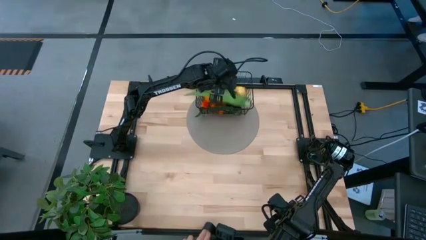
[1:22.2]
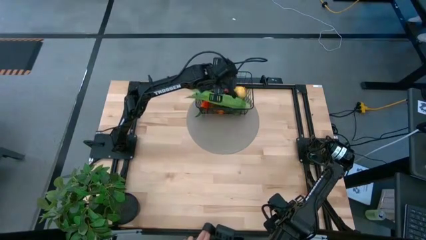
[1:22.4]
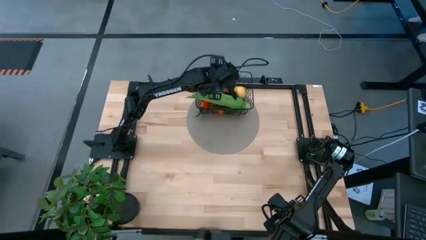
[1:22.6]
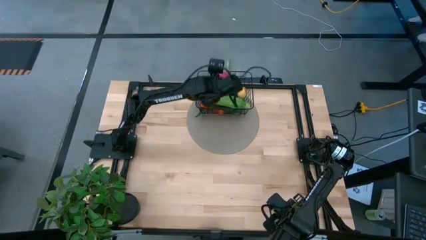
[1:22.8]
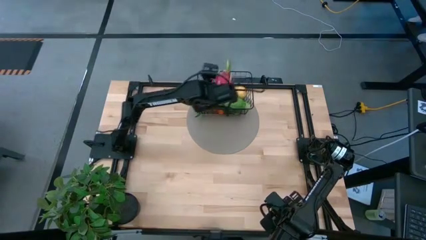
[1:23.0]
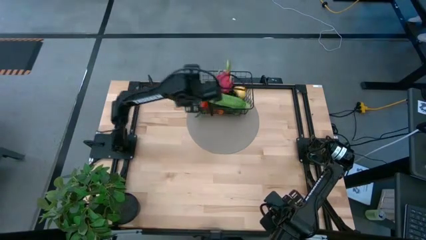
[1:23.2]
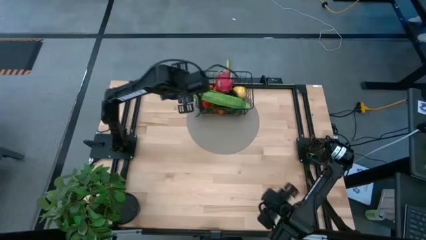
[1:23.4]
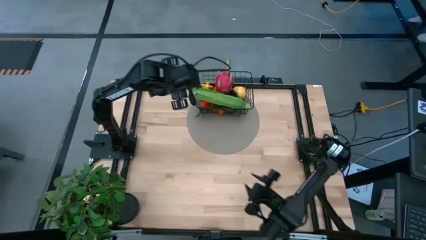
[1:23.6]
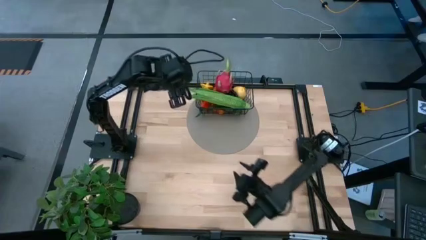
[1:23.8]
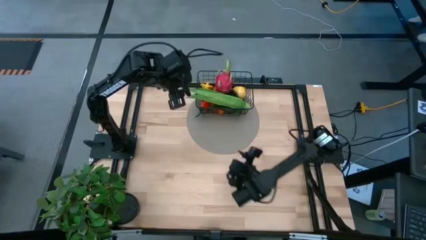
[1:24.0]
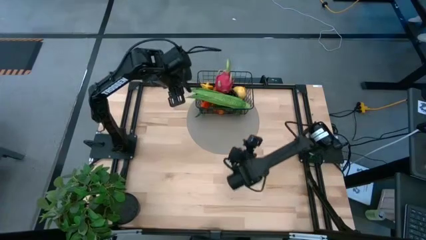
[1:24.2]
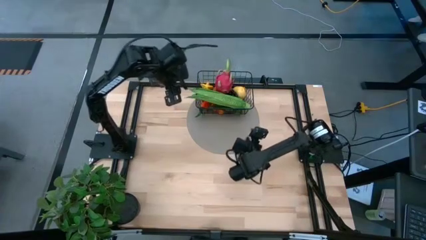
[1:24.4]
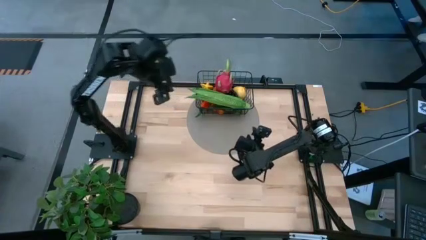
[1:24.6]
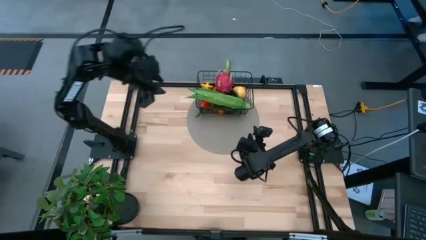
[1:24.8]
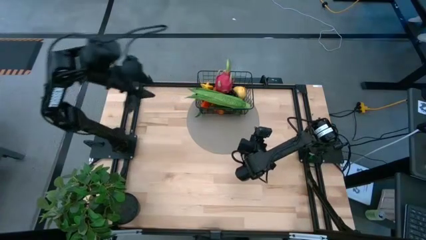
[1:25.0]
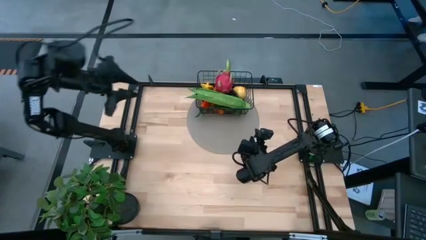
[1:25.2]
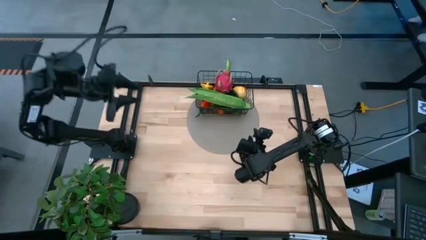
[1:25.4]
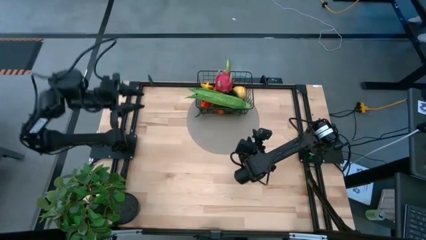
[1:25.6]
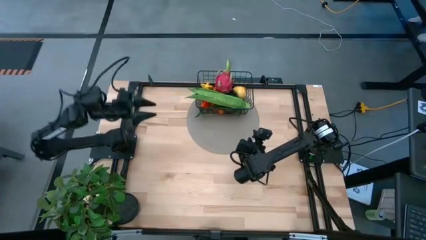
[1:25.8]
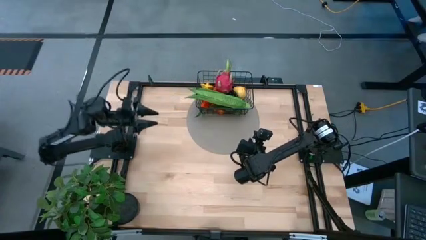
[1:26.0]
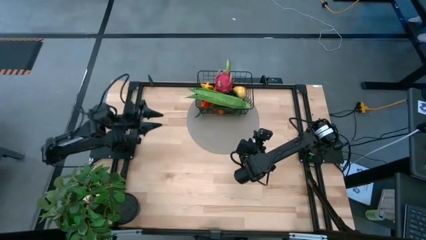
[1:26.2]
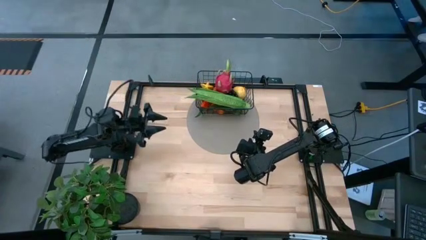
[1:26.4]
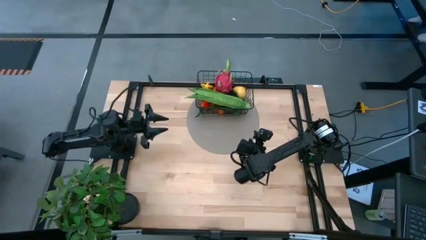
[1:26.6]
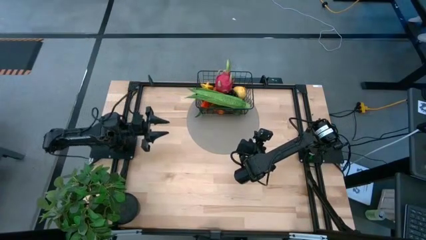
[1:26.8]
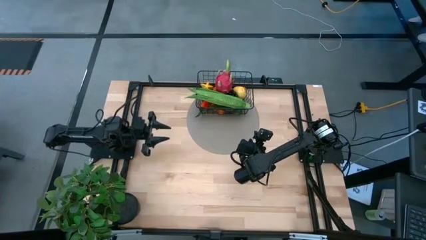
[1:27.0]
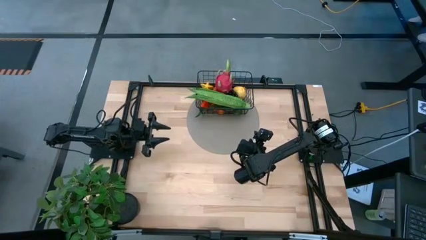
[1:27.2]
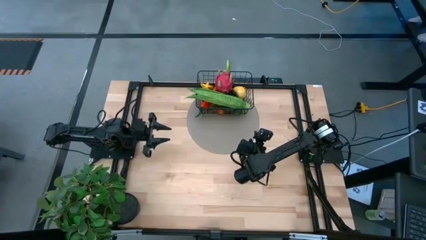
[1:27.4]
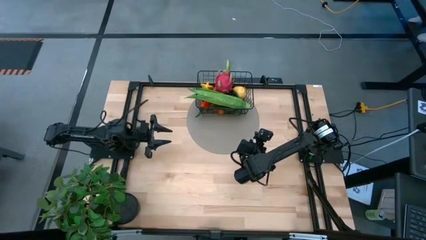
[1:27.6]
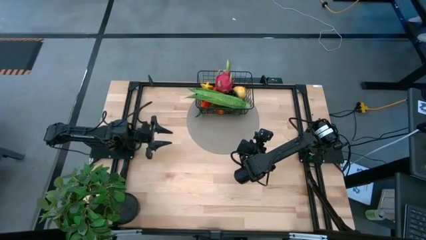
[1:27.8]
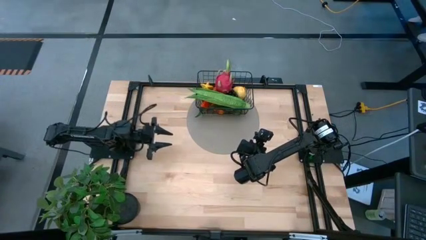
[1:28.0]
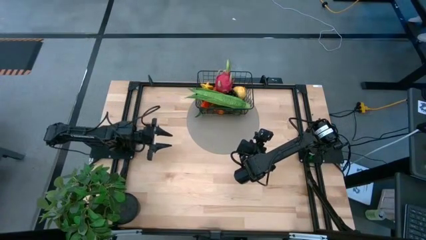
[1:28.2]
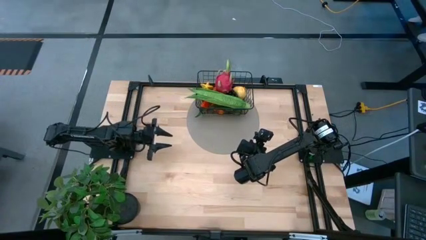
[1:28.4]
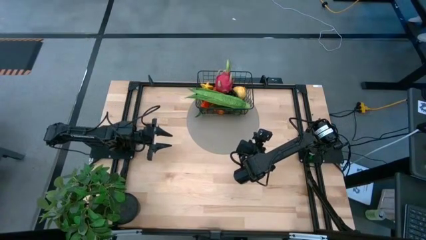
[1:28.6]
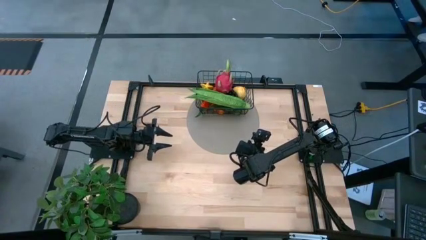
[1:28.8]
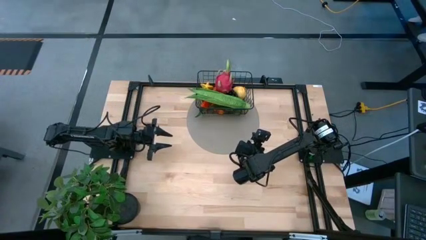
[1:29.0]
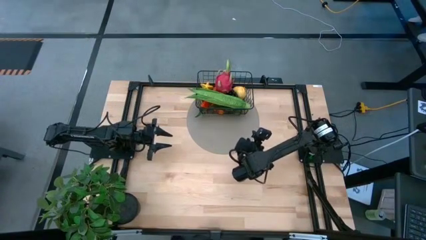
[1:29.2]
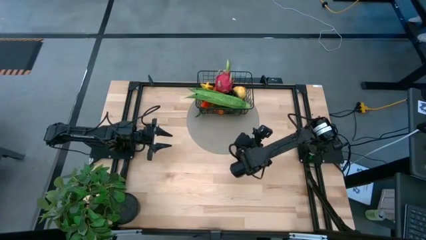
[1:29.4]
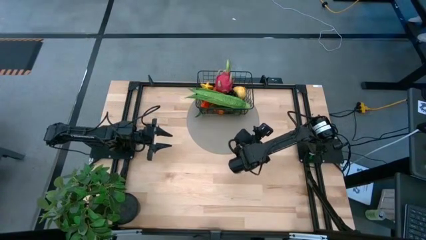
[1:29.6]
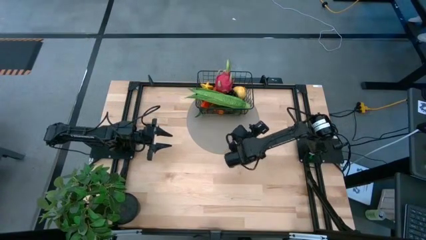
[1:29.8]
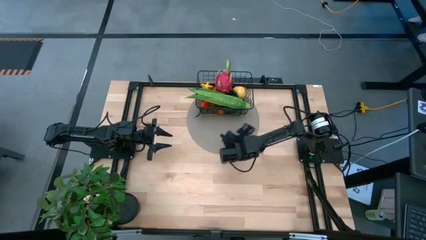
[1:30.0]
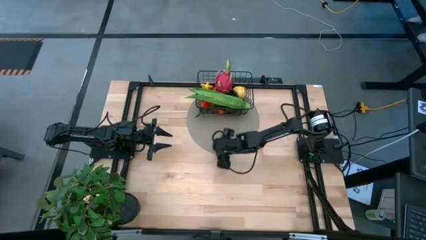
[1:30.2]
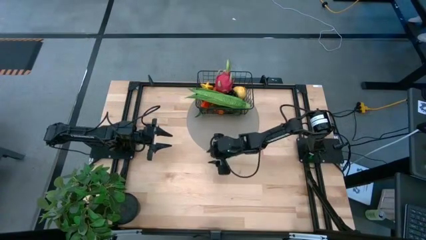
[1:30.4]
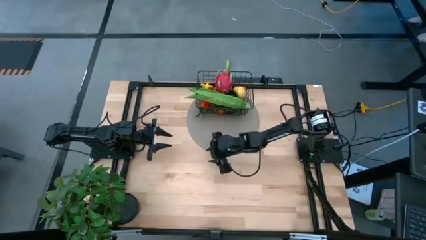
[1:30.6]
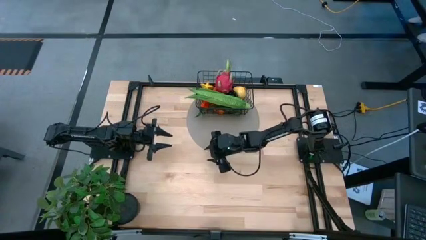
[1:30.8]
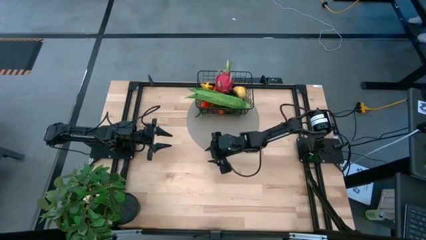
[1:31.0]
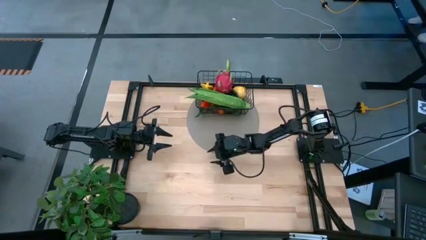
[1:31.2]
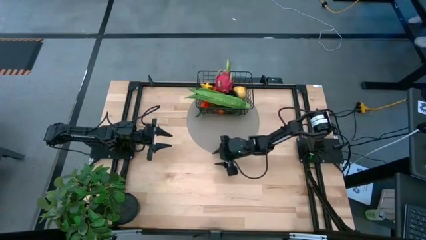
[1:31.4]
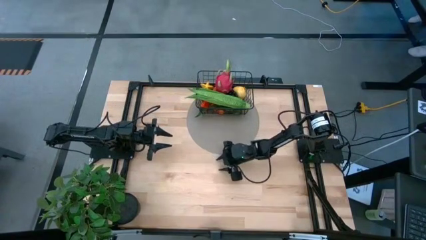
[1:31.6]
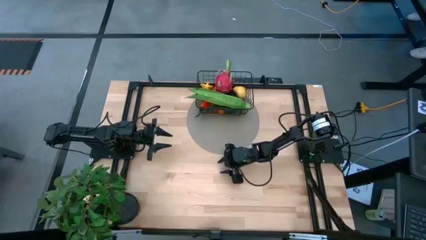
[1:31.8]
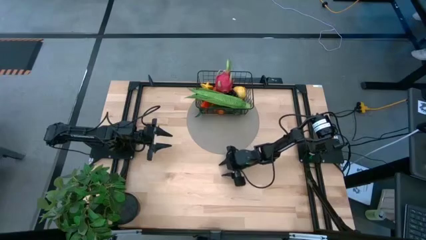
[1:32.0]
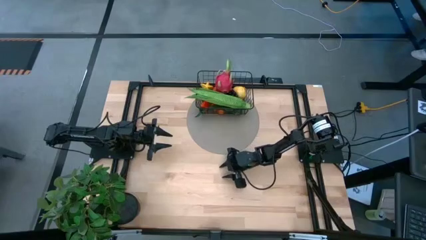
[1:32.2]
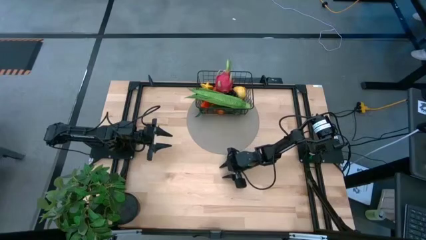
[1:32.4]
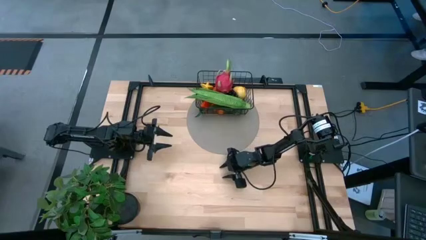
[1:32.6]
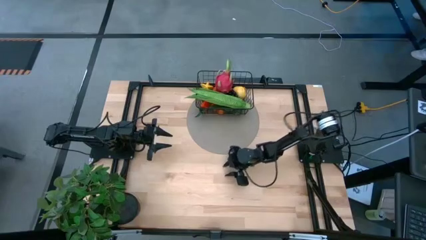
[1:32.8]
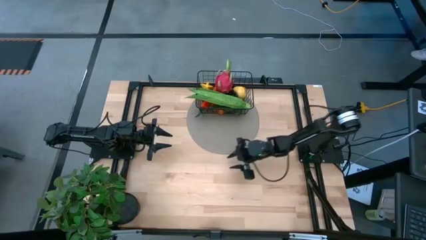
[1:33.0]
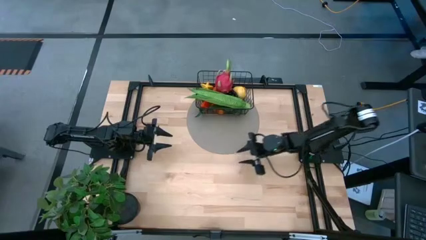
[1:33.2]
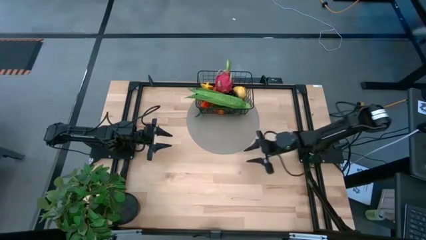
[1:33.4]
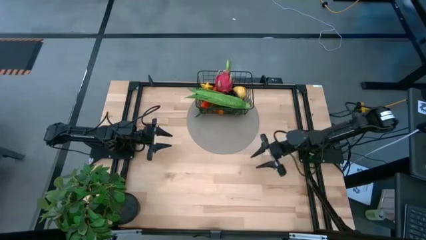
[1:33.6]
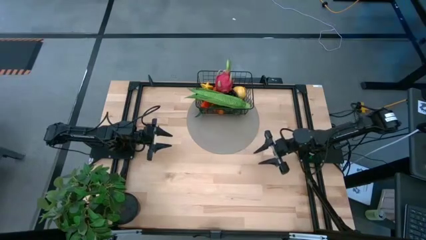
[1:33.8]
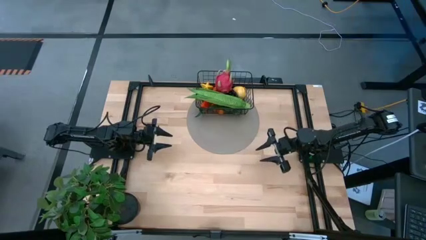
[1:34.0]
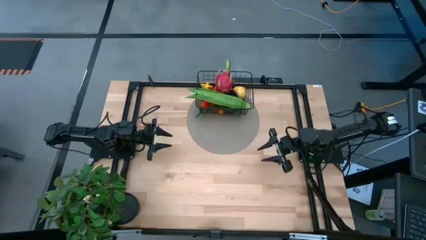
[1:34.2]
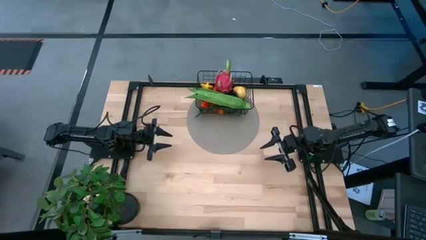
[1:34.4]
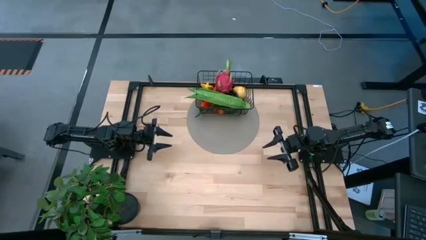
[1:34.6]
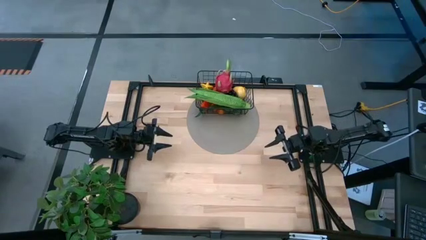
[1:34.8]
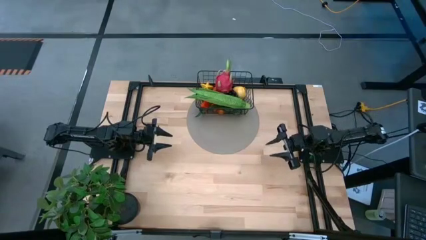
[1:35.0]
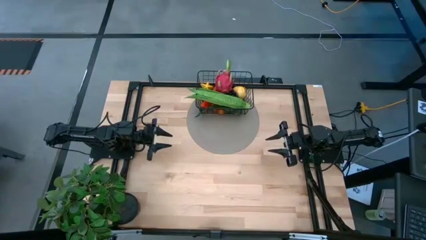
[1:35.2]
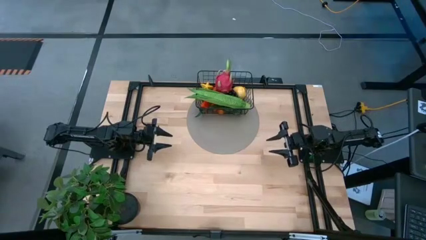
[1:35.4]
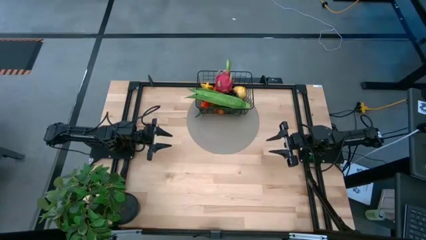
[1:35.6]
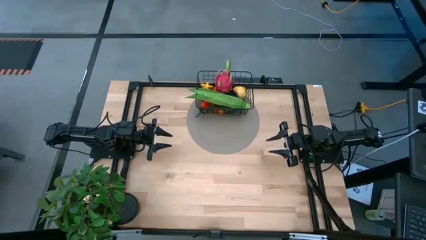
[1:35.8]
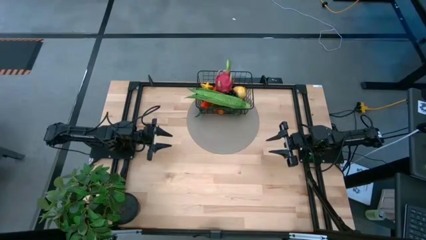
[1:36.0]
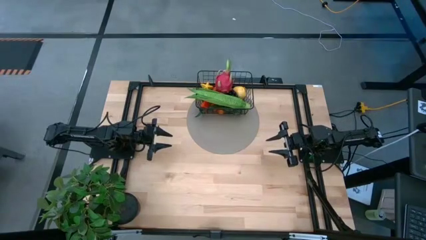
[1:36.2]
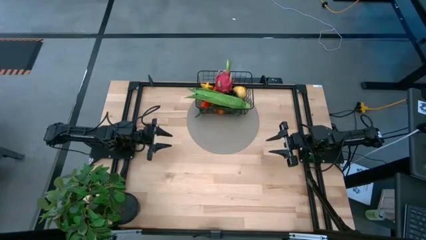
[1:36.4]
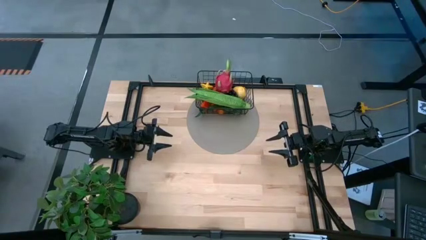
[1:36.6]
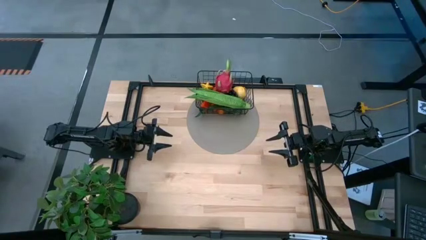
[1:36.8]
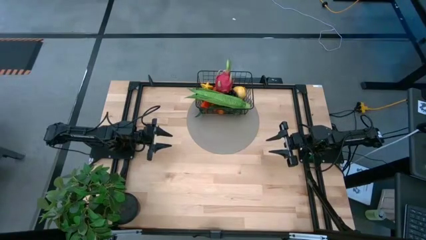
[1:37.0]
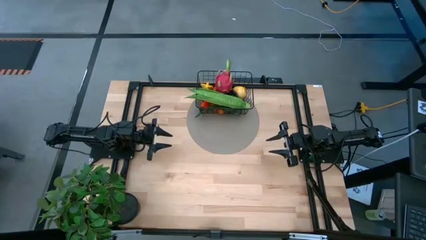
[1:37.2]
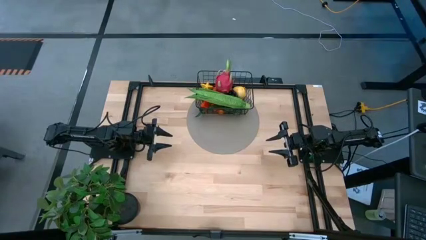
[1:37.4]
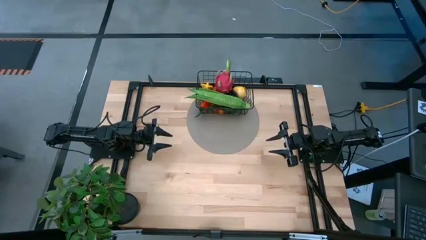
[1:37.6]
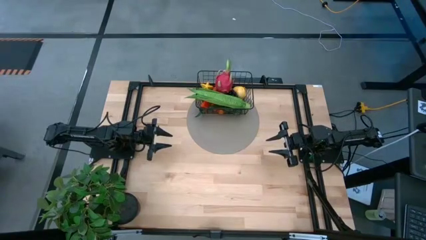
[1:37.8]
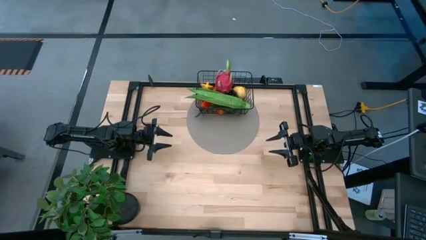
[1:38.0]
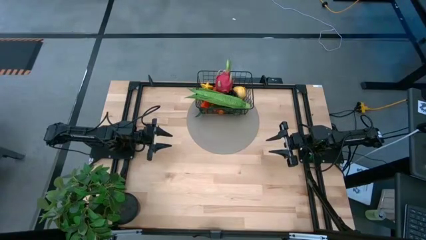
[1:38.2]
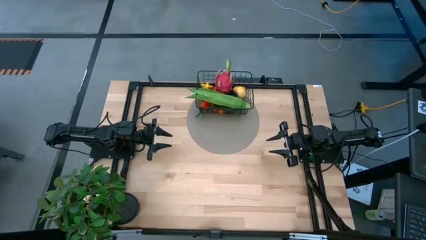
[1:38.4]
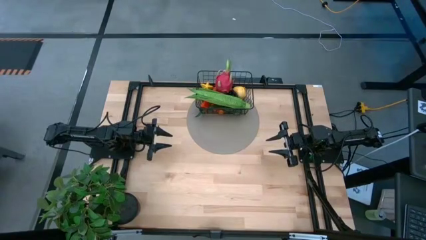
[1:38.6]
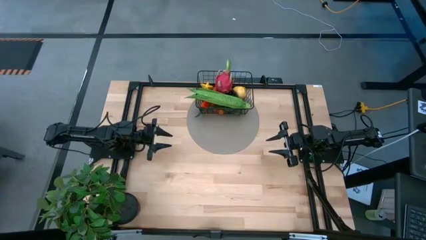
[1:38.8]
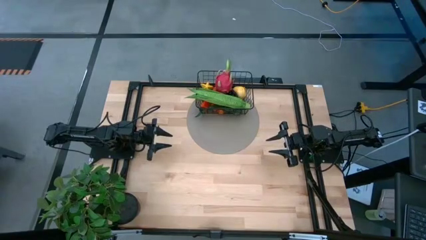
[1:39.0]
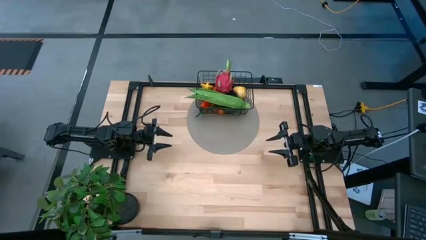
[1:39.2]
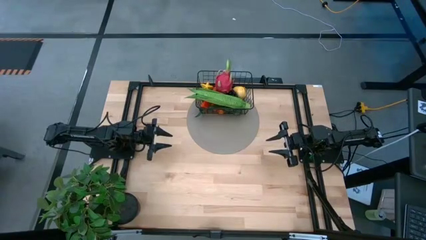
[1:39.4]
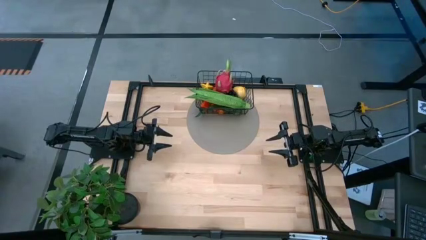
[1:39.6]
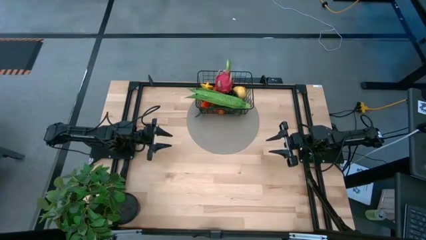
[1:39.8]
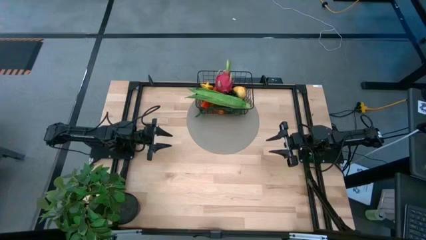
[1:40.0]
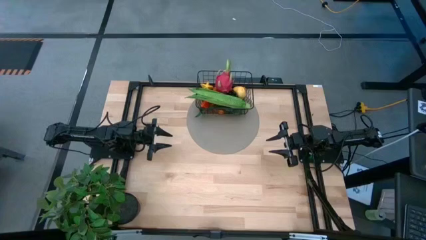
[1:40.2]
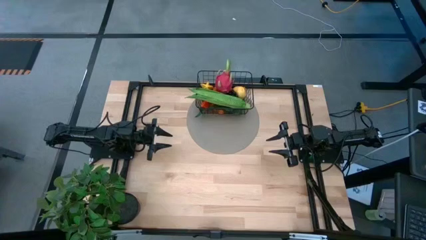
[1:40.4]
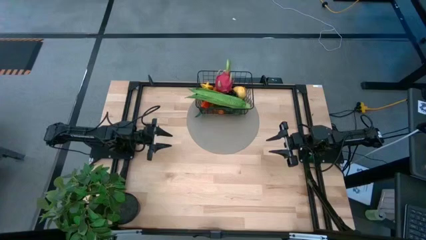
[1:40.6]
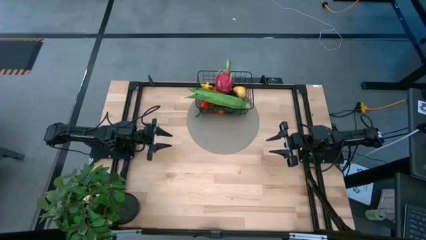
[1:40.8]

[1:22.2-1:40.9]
Task: Build produce basket
Return to Home Position
